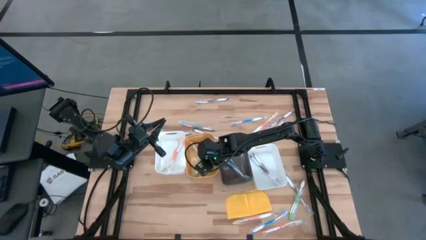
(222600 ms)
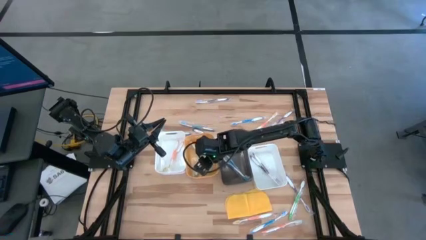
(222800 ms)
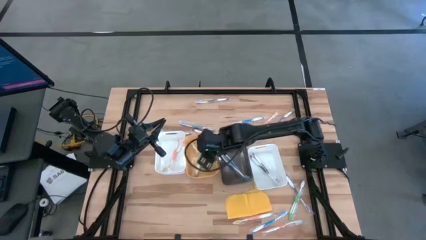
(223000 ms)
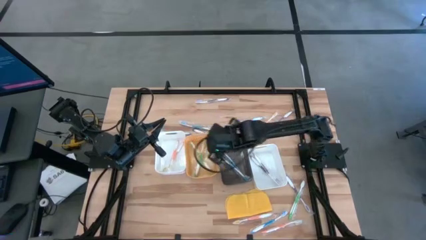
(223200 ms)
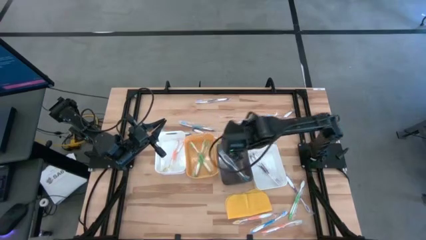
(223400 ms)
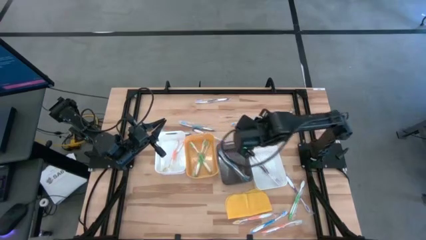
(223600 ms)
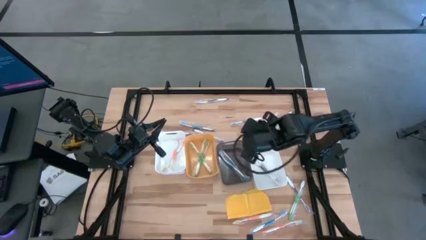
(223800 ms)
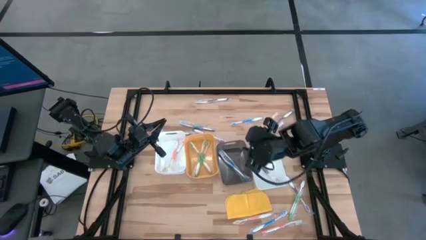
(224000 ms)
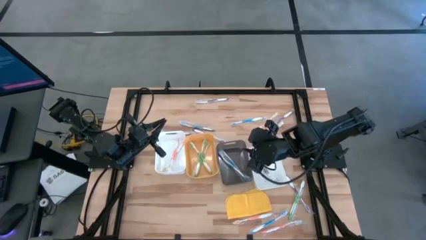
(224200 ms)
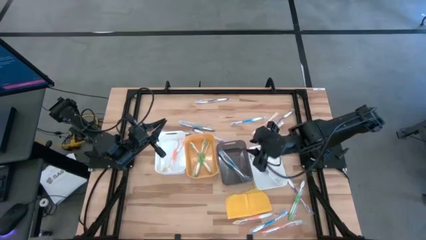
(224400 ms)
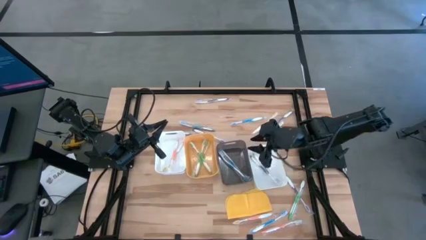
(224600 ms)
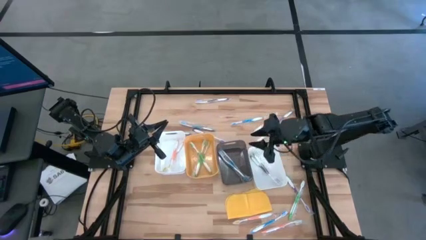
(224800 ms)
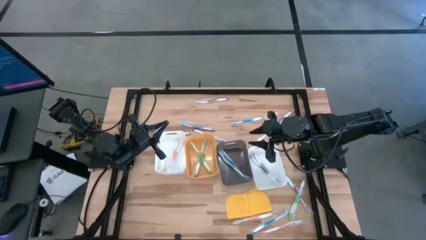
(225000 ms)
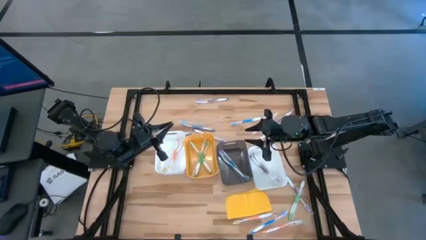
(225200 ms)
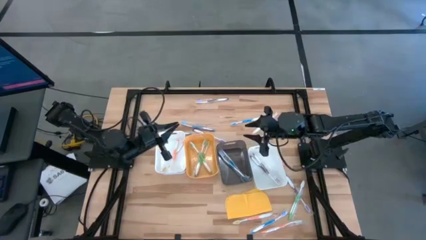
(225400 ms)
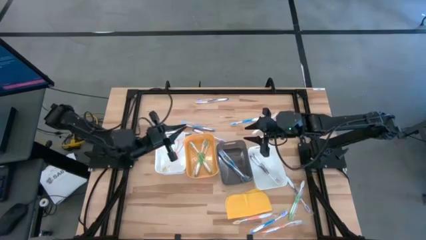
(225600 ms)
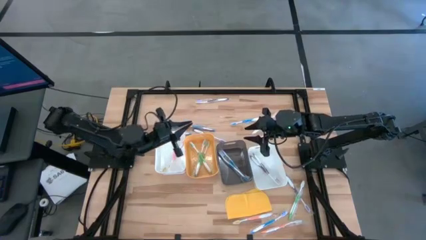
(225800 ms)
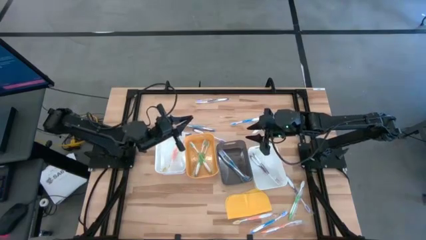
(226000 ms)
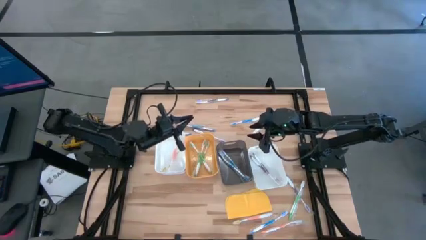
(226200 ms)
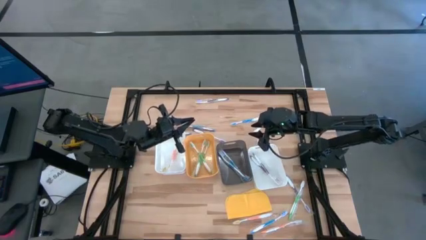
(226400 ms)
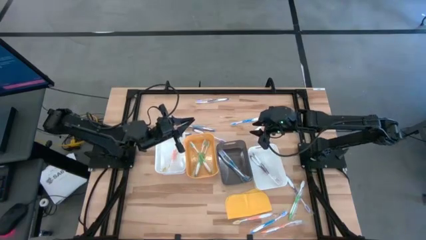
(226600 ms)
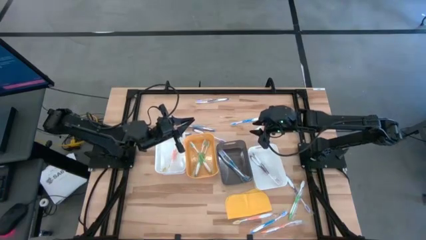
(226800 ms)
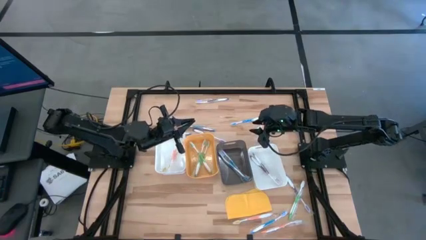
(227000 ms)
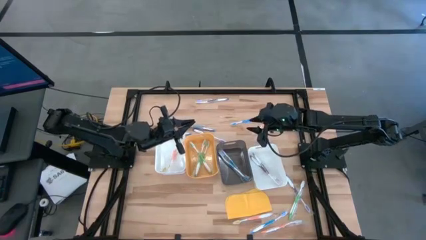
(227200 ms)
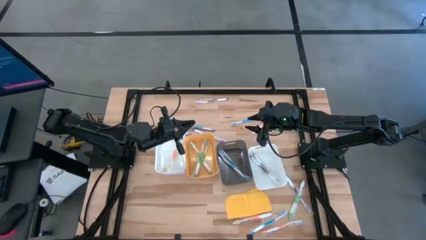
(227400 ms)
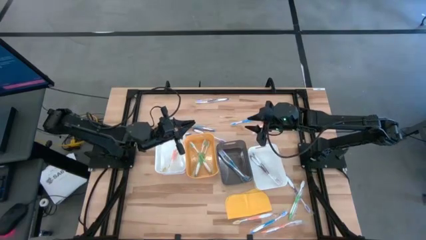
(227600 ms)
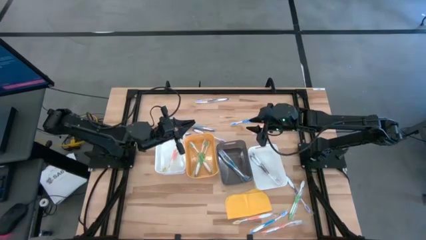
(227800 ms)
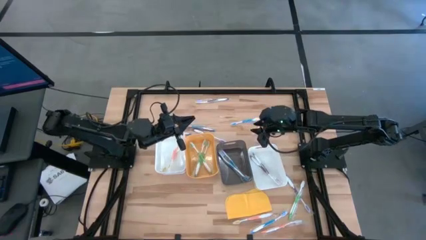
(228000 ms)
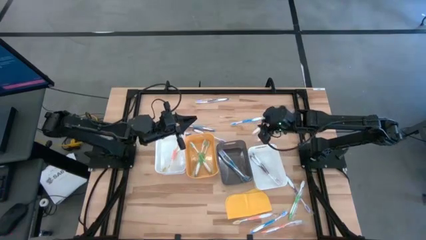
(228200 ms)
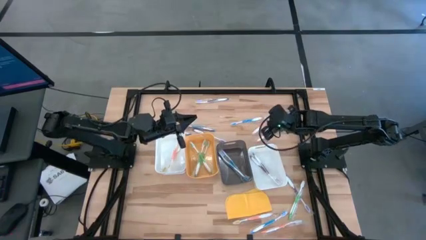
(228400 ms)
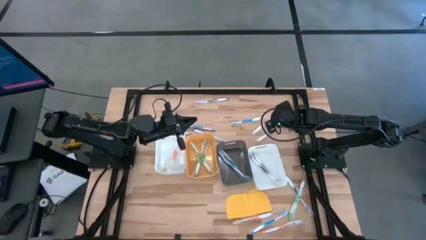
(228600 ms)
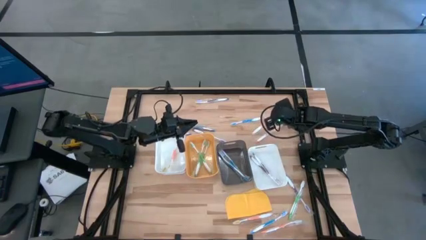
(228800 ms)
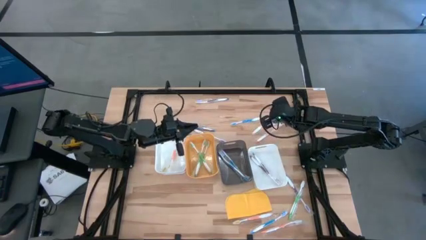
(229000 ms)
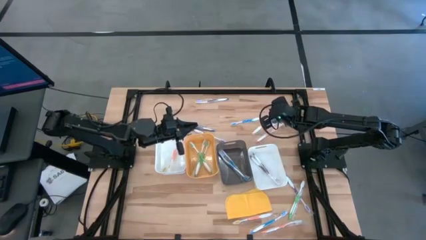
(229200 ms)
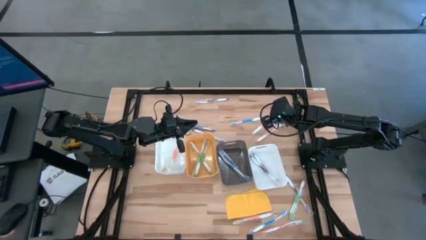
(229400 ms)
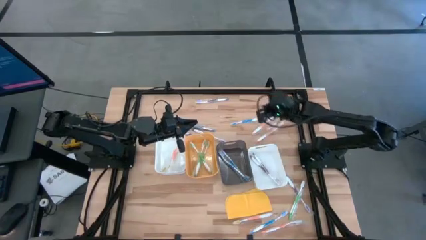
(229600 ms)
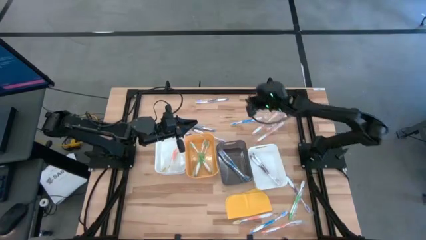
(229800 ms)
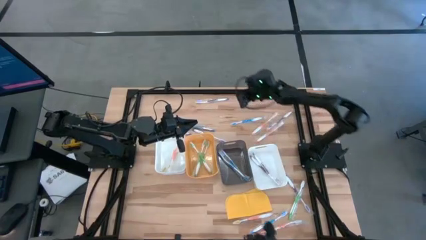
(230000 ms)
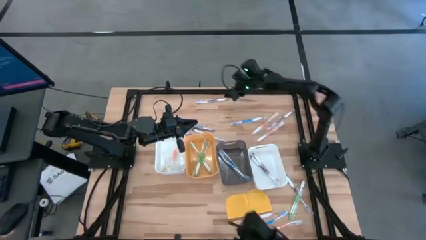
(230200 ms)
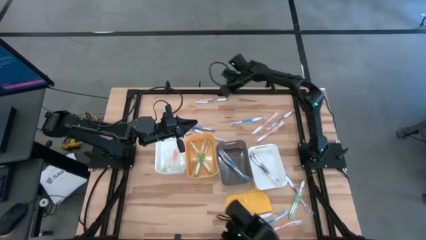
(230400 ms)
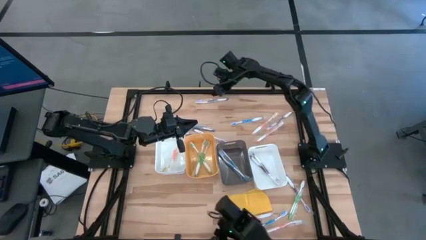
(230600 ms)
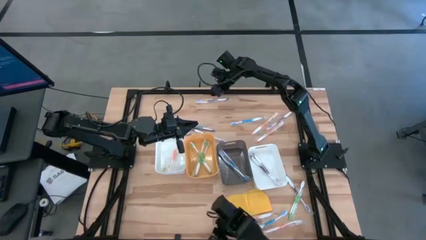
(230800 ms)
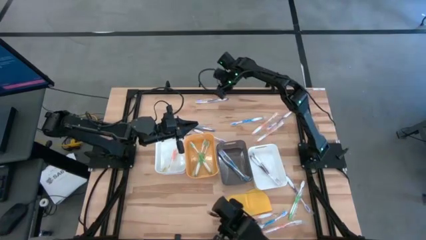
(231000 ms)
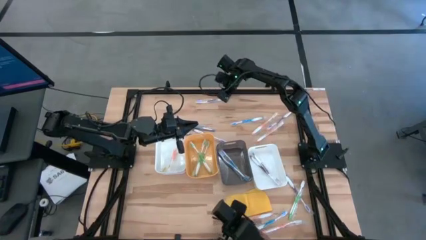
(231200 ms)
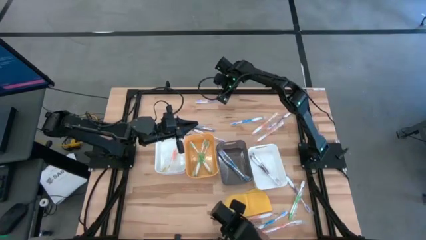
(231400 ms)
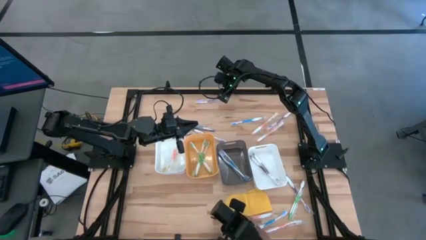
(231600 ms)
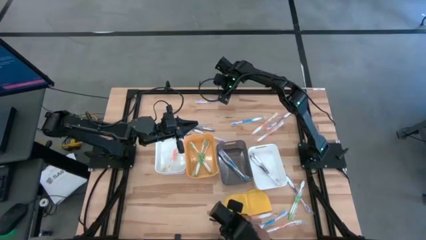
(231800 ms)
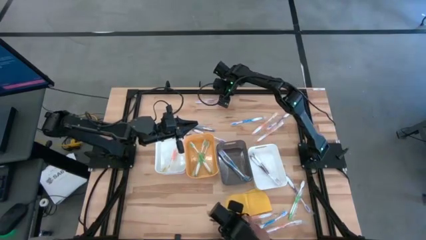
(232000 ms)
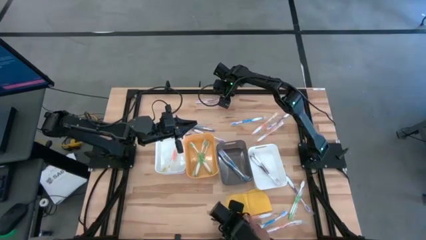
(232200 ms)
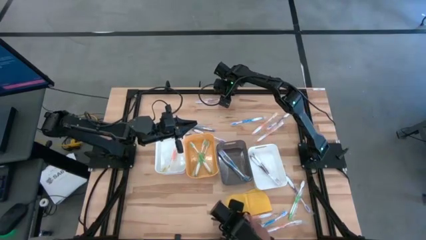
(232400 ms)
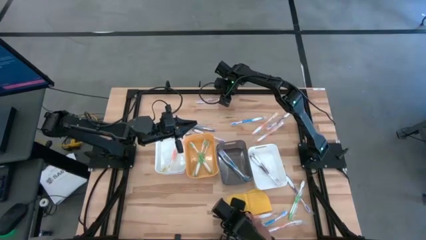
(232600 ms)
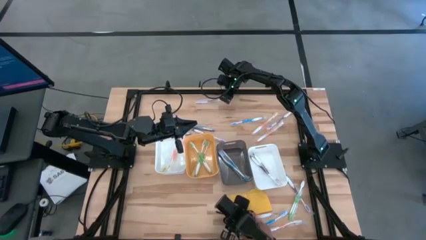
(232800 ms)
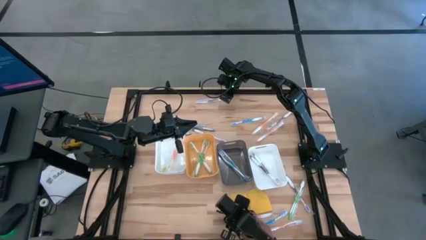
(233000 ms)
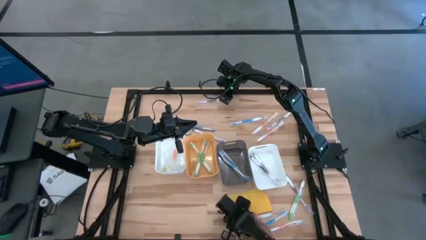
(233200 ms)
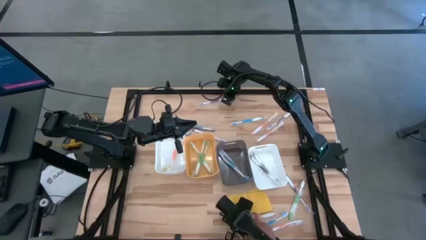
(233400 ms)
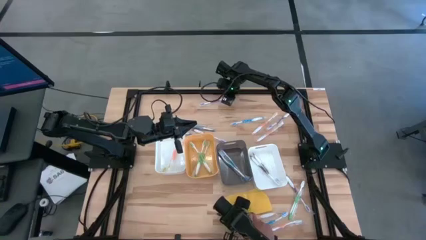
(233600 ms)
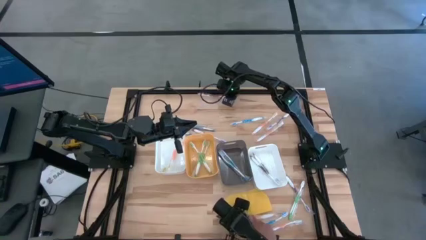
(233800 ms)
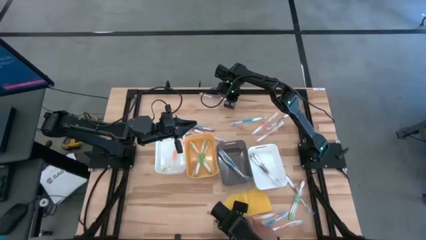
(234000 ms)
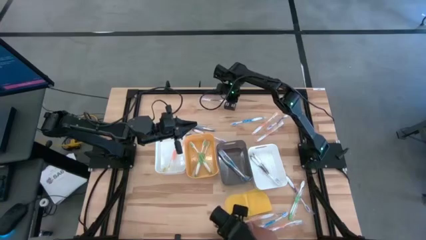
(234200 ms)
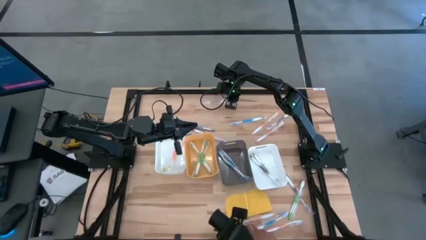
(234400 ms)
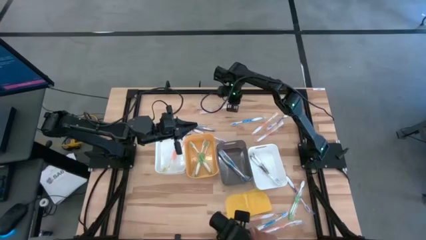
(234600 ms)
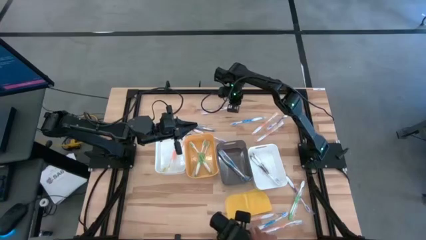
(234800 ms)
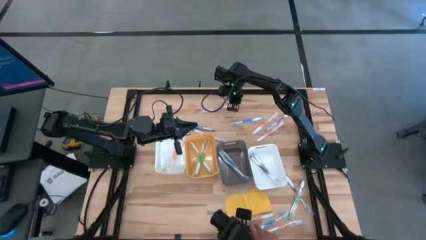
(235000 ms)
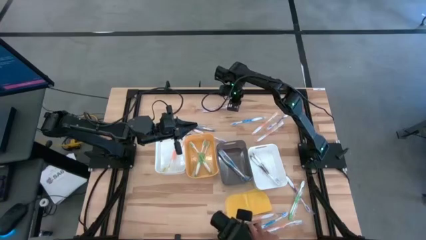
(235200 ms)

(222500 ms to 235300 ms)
Task: Pick & Place Toothbrushes
Put the purple toothbrush into the right white bin
